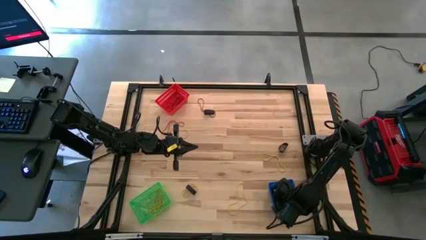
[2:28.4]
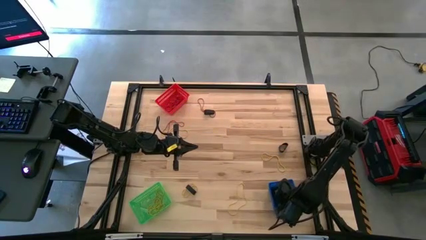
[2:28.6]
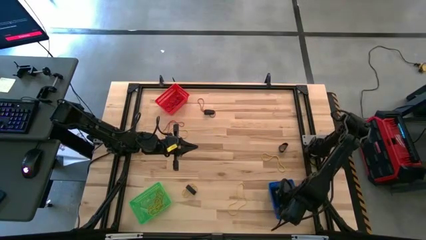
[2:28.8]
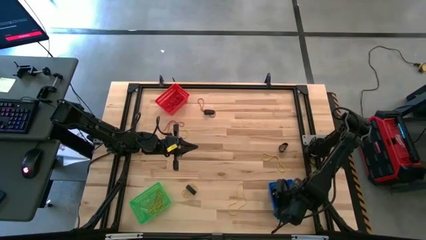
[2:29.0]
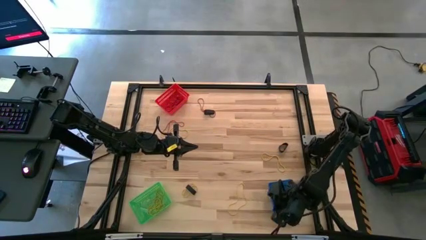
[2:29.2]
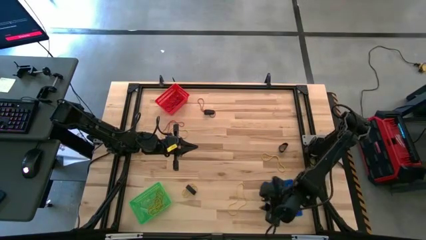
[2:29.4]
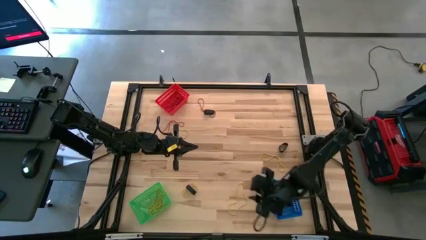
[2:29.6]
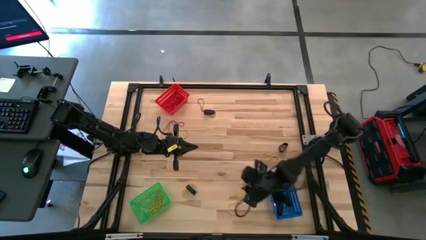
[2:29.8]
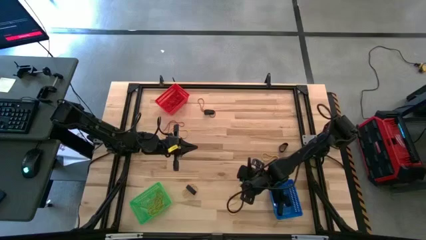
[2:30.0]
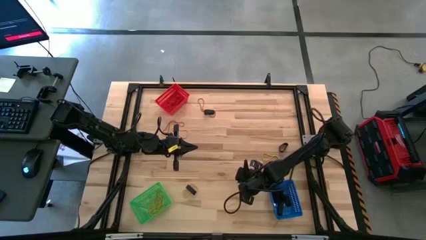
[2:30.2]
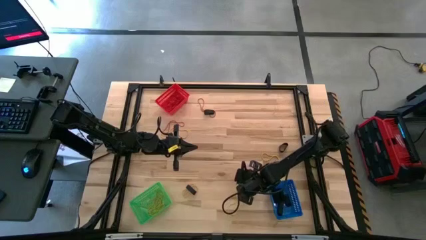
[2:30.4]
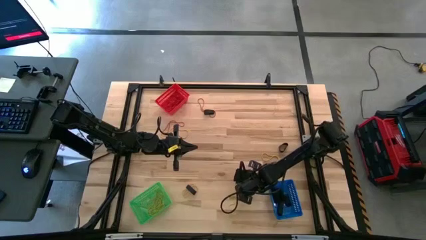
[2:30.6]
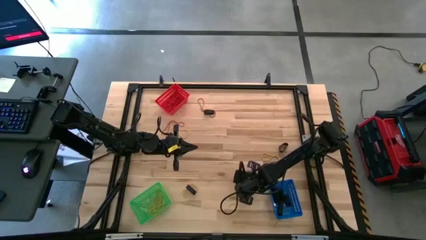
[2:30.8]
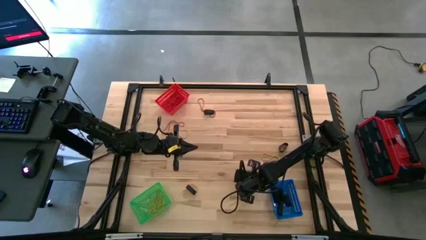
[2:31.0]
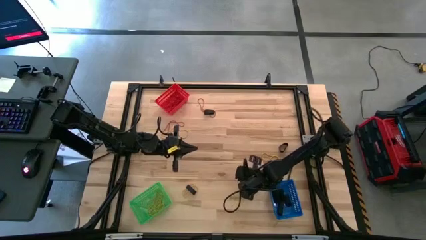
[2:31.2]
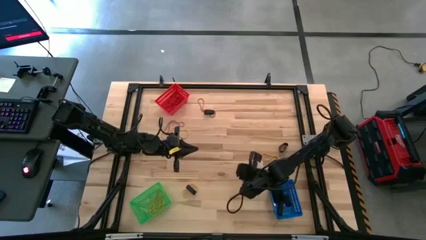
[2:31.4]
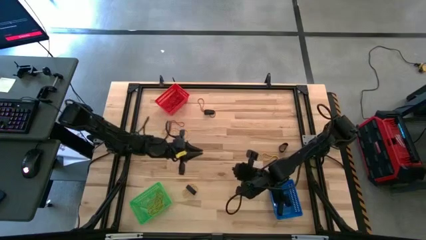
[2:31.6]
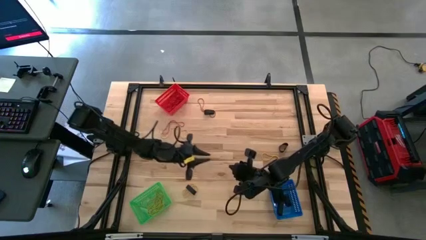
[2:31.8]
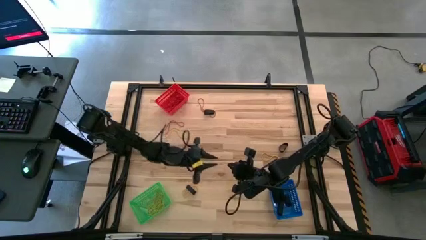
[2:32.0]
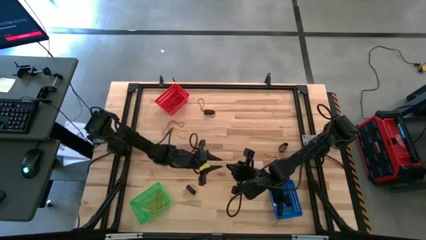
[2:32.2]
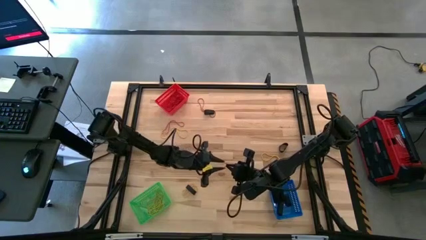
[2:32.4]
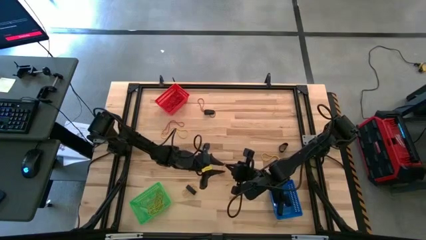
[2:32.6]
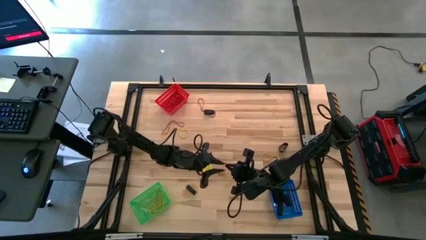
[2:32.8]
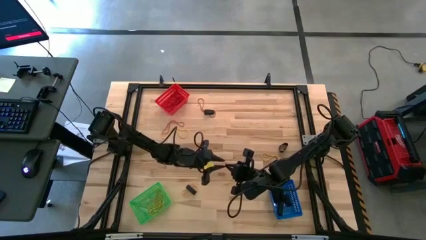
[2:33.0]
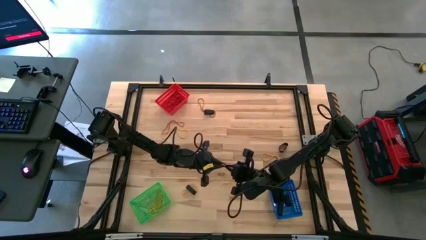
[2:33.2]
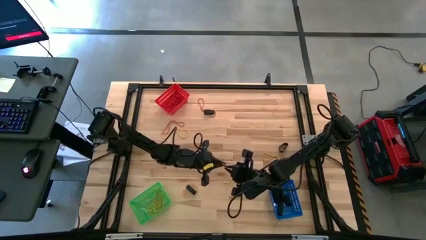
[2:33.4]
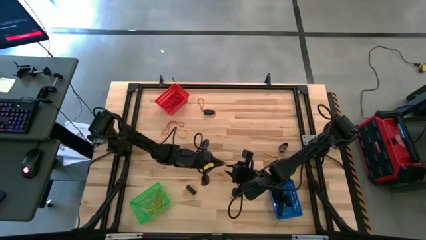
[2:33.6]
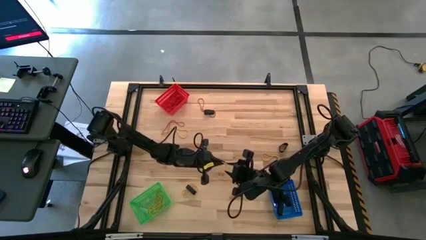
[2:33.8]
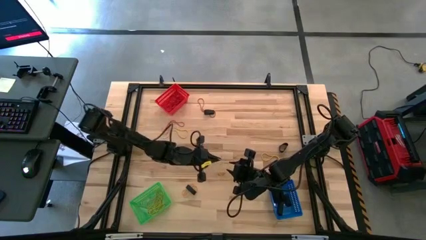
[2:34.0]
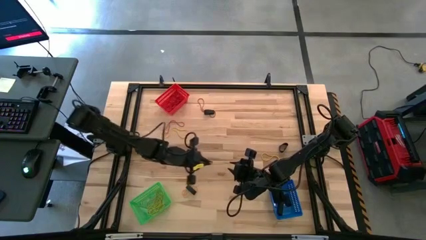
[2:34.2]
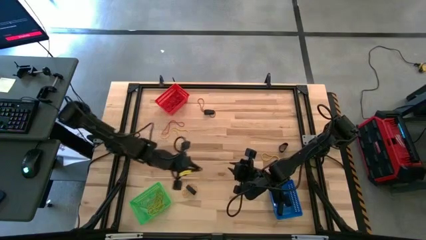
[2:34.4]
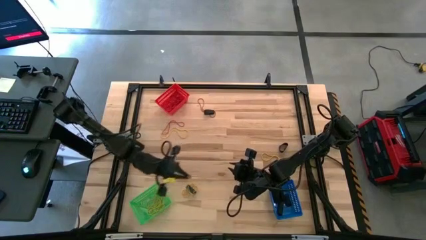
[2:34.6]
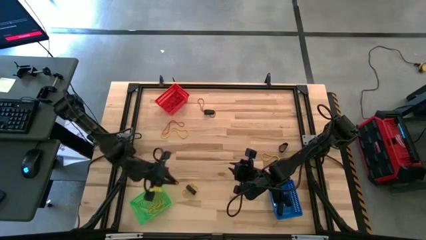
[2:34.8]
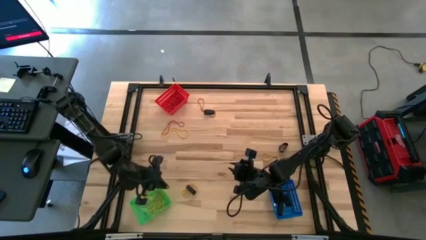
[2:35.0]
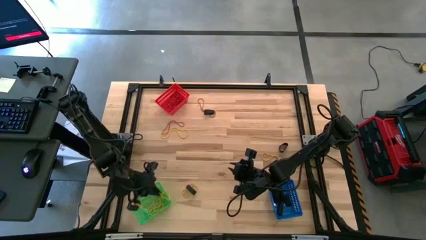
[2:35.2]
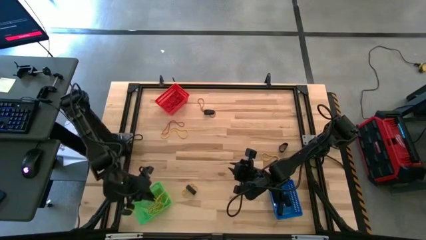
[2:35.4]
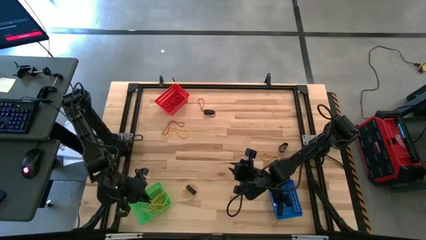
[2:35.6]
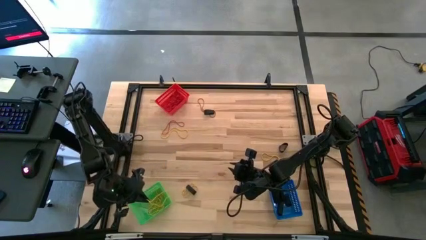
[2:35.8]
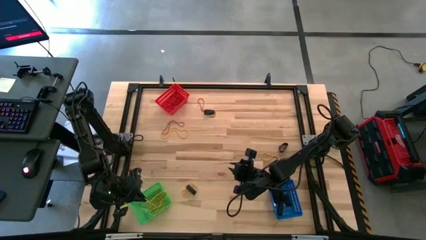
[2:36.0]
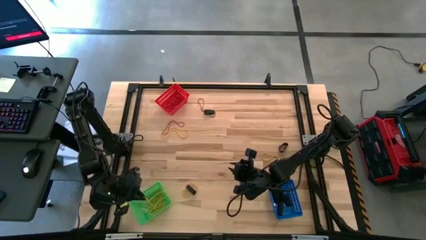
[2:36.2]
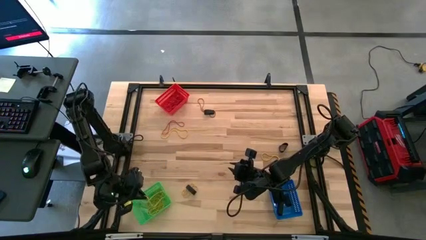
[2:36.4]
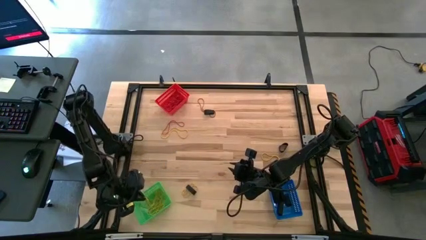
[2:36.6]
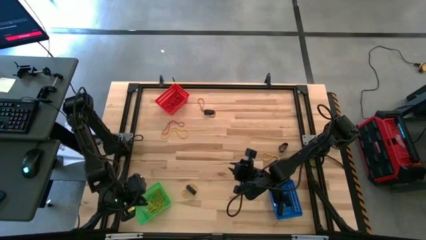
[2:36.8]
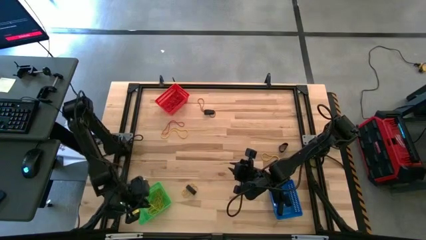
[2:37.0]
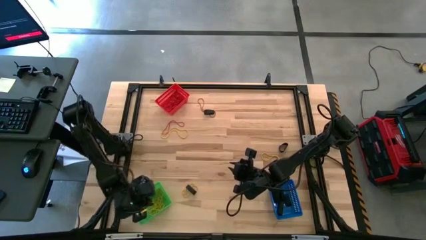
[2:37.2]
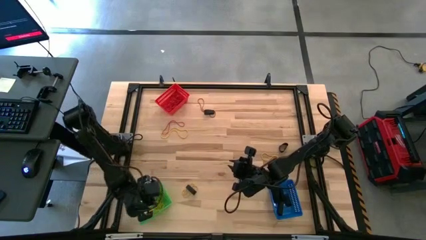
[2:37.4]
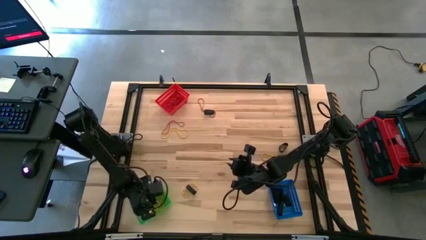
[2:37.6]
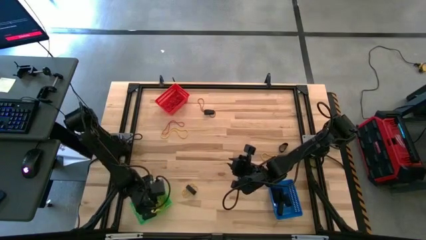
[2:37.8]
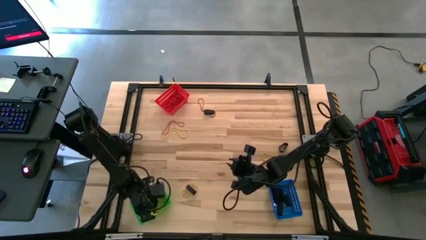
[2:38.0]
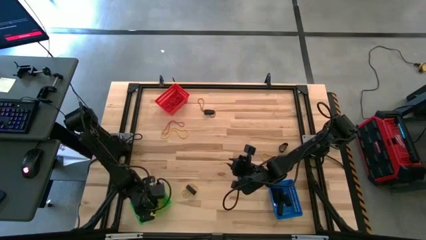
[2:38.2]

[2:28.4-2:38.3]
Task: Sort rubber bands into baskets
Put the yellow rubber band into the green basket

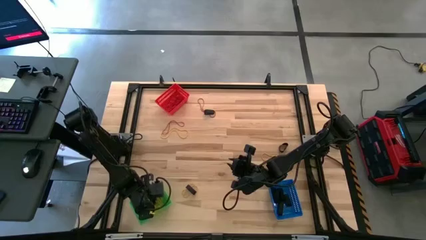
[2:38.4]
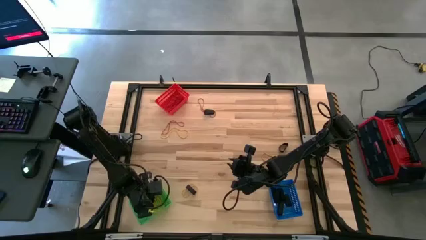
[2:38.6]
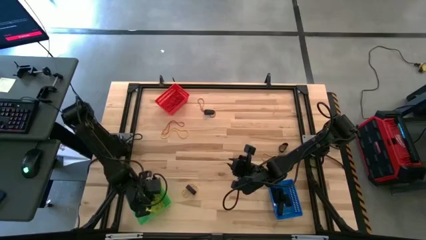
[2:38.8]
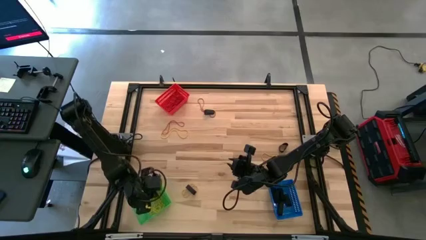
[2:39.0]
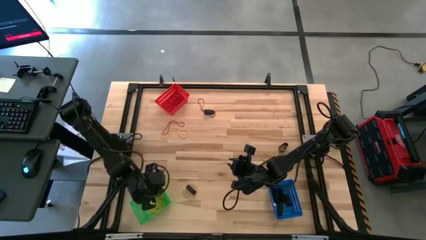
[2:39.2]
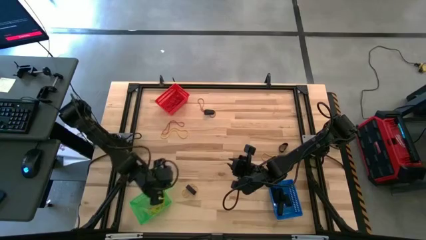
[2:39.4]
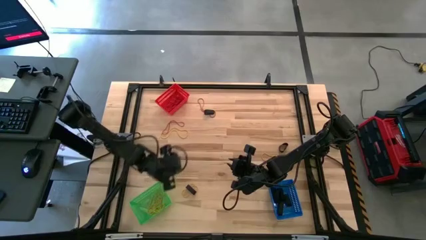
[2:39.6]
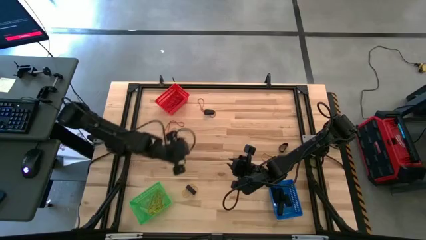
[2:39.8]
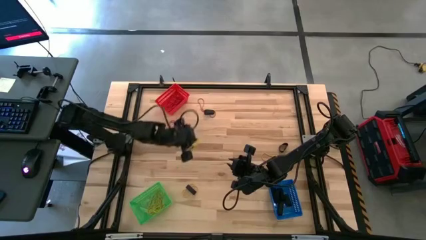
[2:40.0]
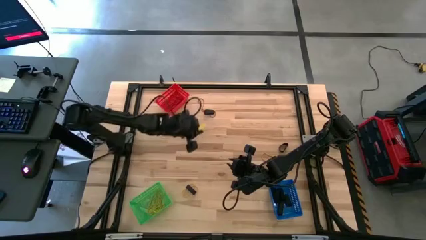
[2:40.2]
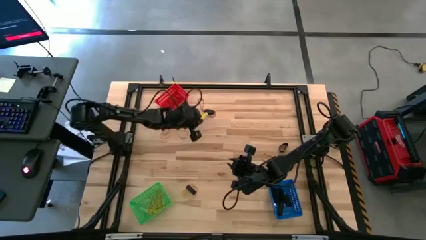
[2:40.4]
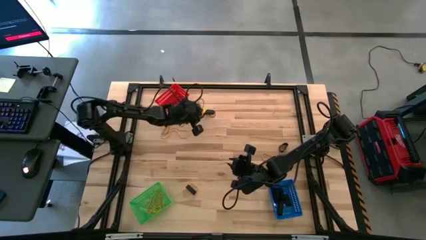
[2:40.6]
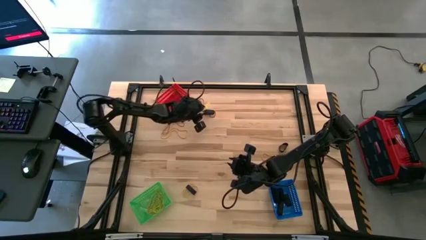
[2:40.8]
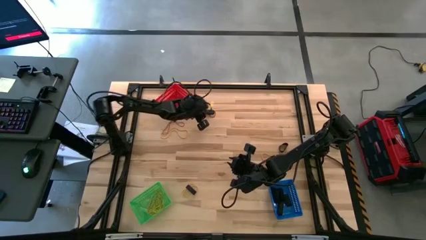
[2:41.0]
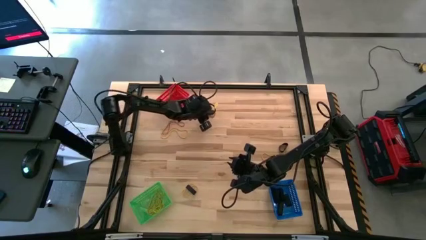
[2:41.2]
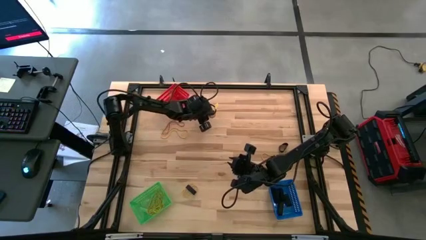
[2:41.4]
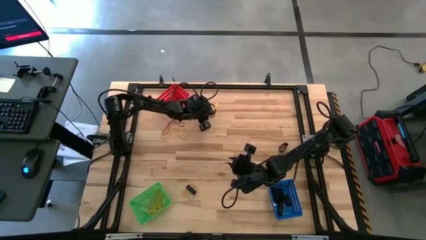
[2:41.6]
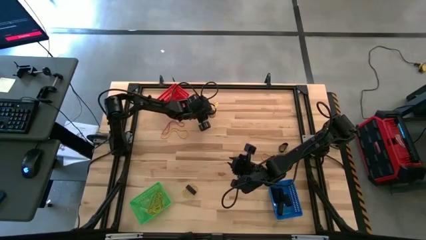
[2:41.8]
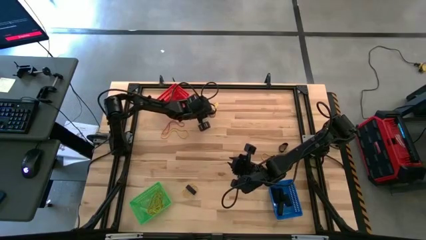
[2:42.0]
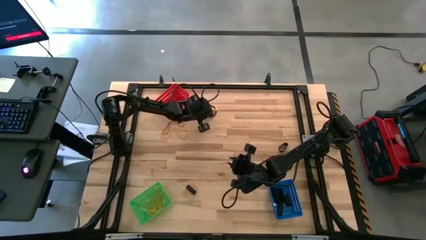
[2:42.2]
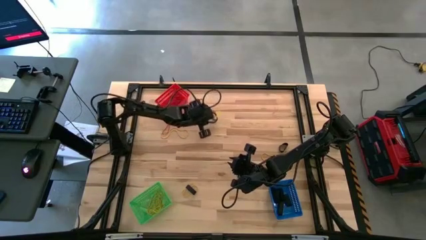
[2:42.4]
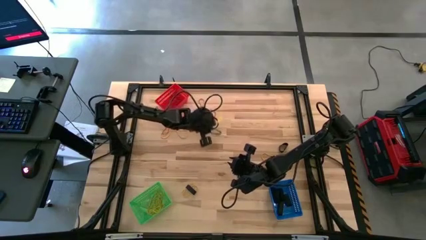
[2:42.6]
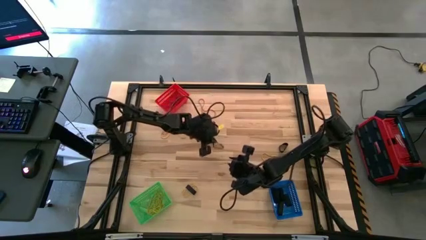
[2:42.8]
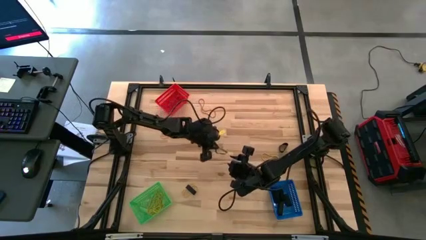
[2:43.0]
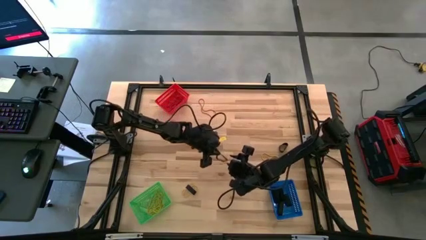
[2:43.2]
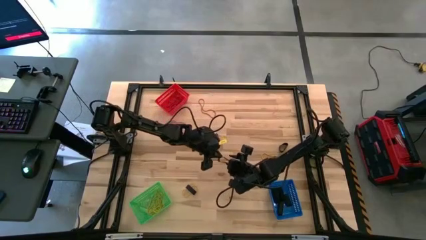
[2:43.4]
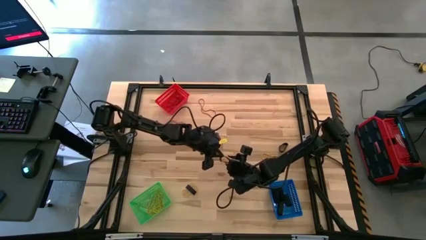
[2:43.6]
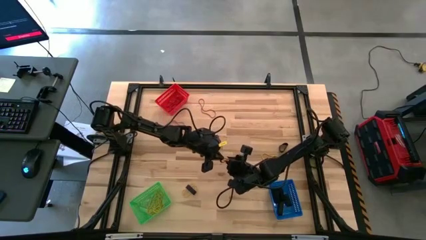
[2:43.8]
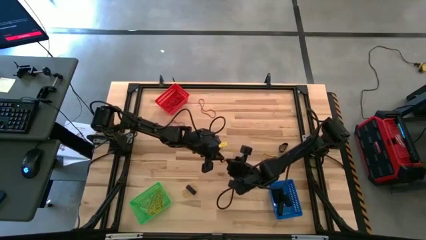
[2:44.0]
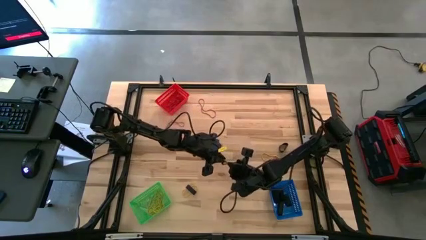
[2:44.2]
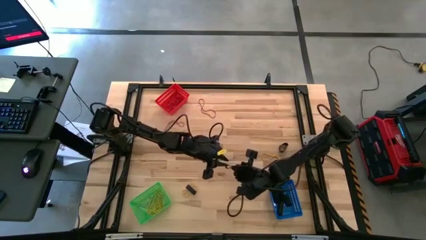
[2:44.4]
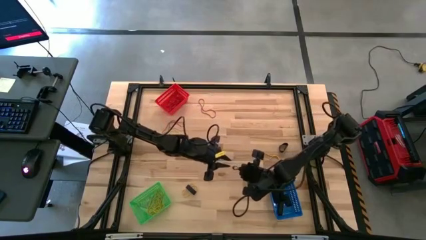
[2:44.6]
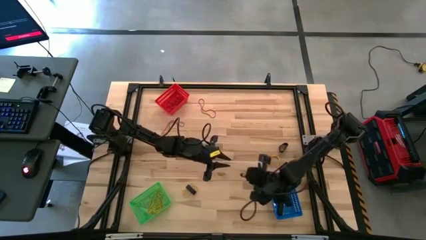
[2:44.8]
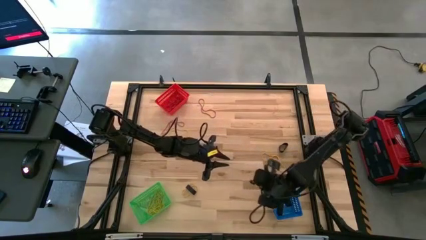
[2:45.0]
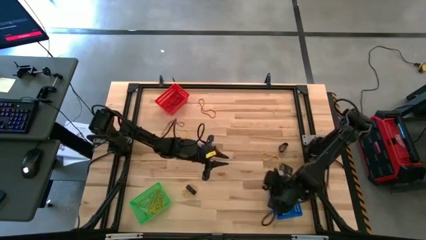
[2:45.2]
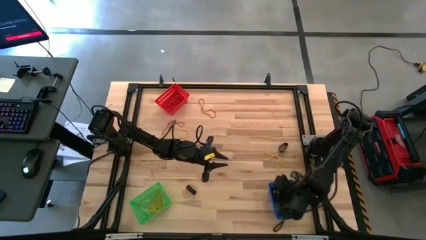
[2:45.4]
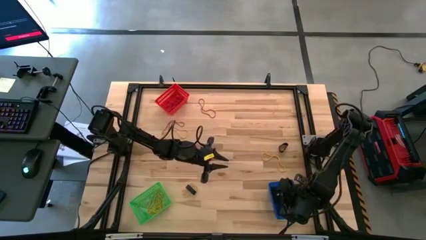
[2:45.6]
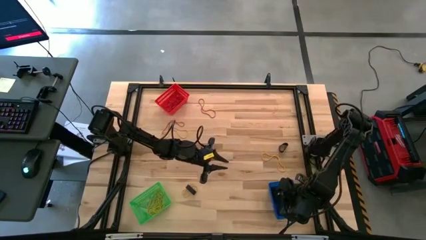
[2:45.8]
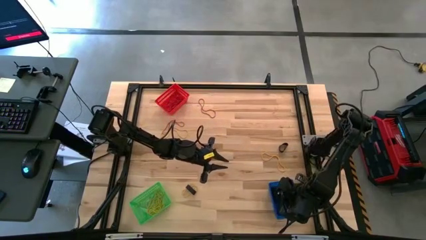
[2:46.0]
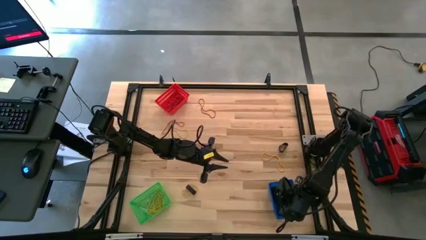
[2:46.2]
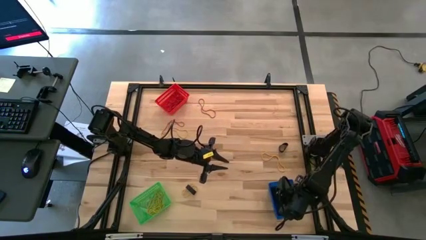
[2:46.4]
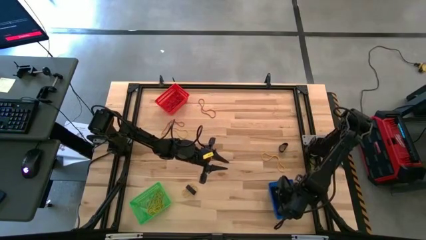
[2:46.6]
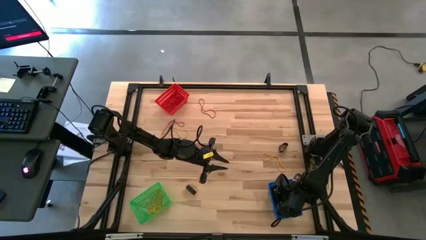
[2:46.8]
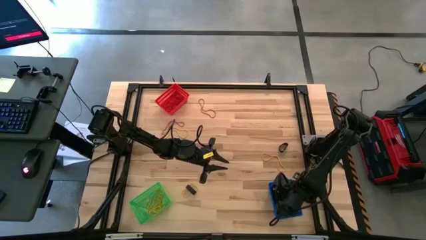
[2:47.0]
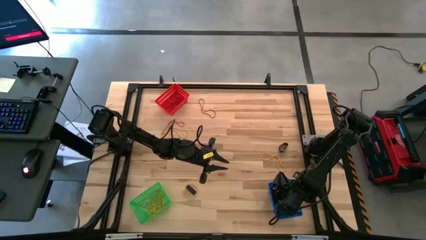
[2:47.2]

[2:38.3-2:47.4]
Put the black rubber band into the blue basket
